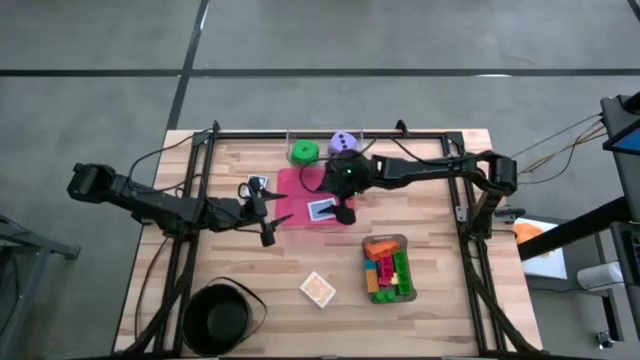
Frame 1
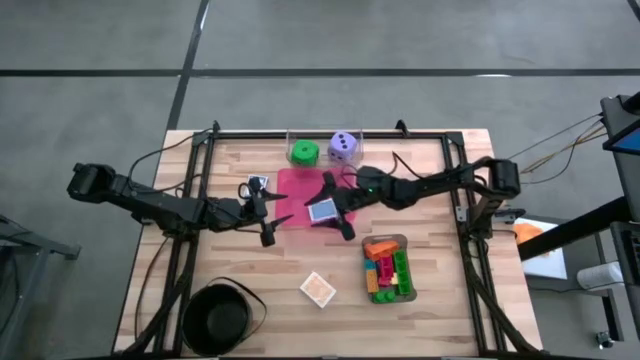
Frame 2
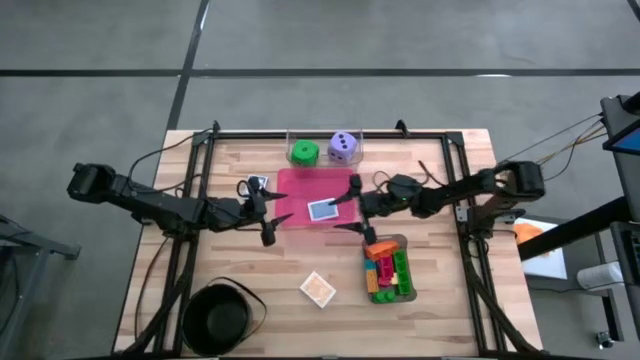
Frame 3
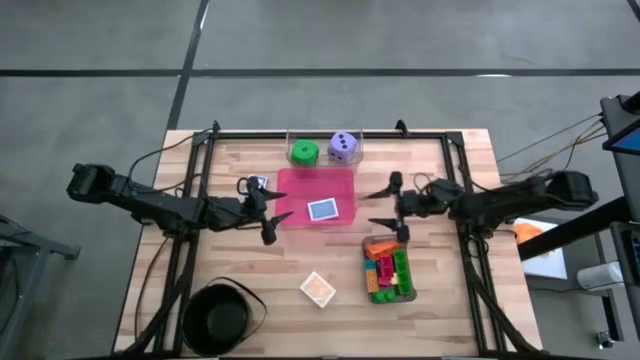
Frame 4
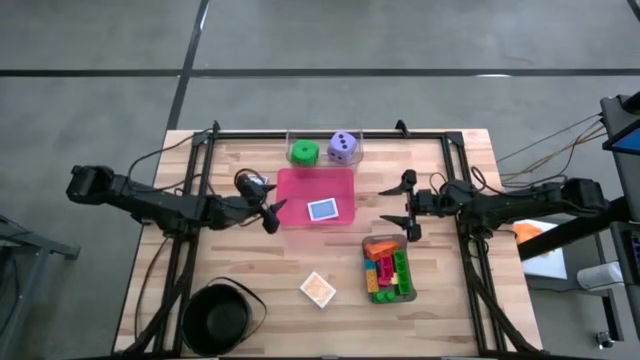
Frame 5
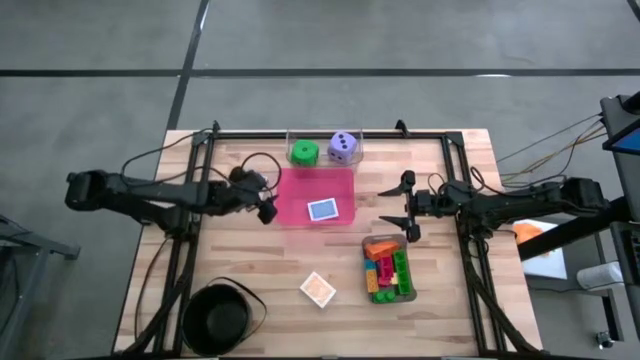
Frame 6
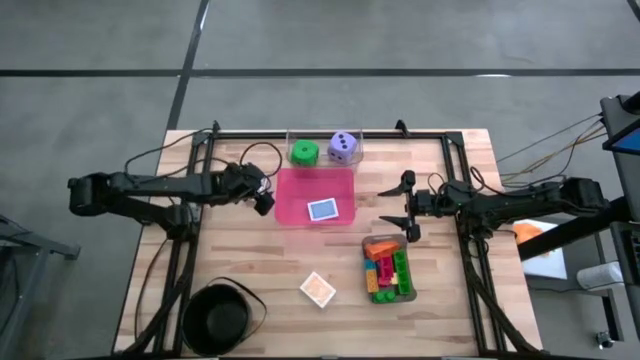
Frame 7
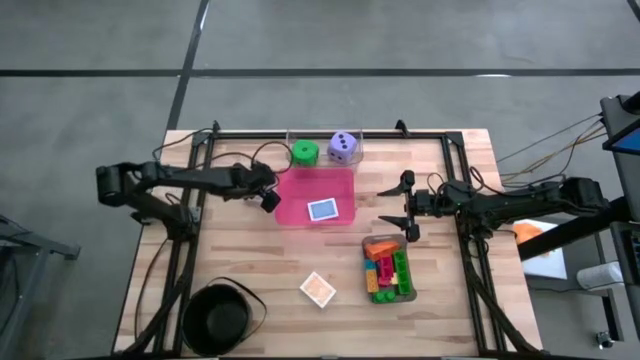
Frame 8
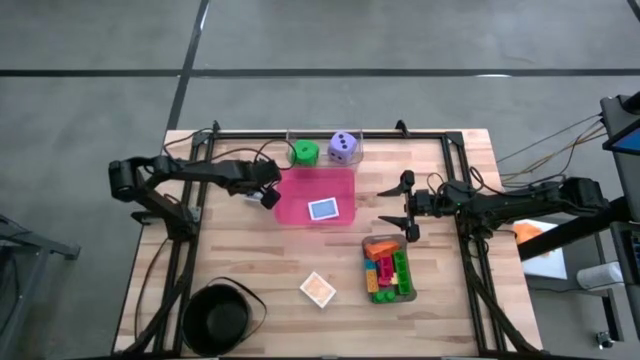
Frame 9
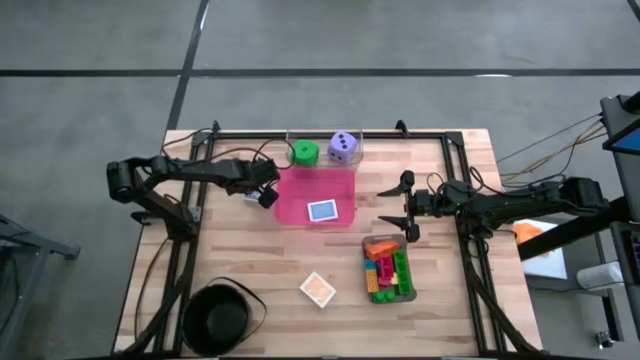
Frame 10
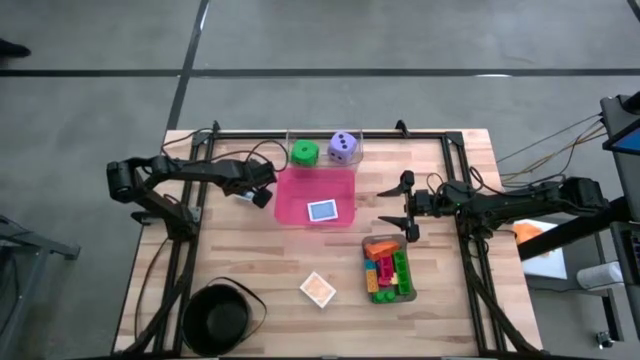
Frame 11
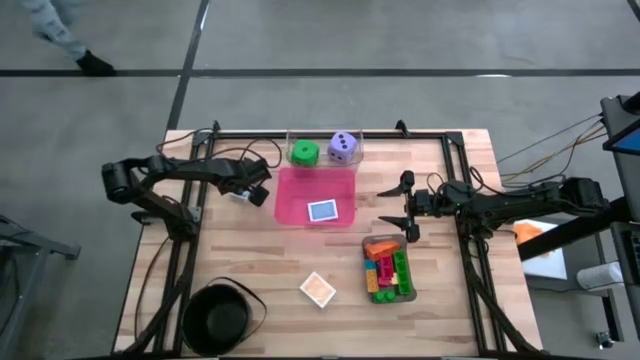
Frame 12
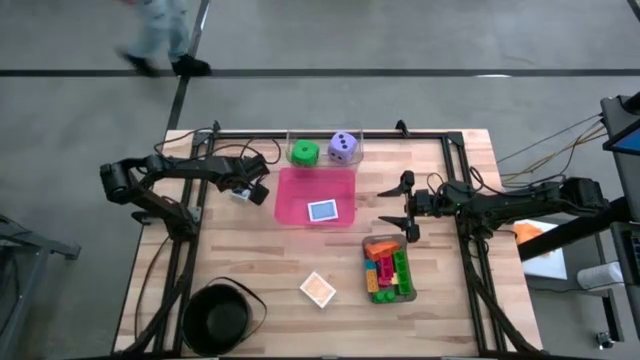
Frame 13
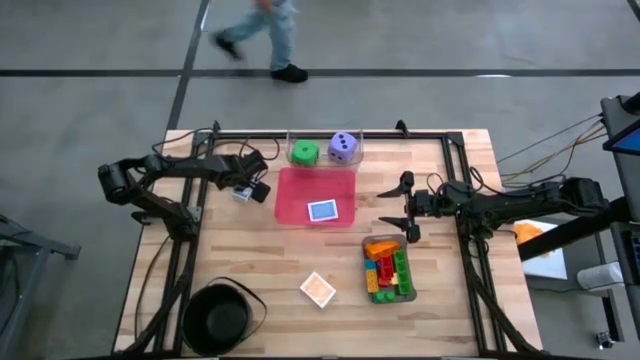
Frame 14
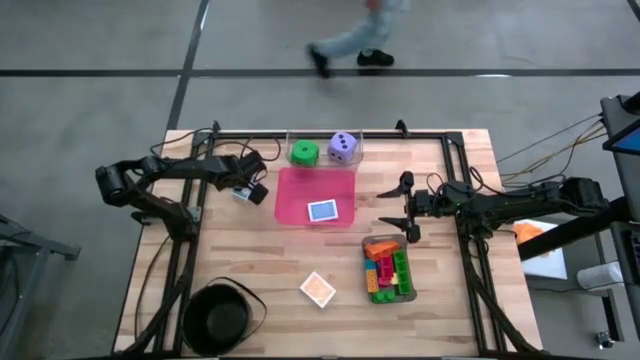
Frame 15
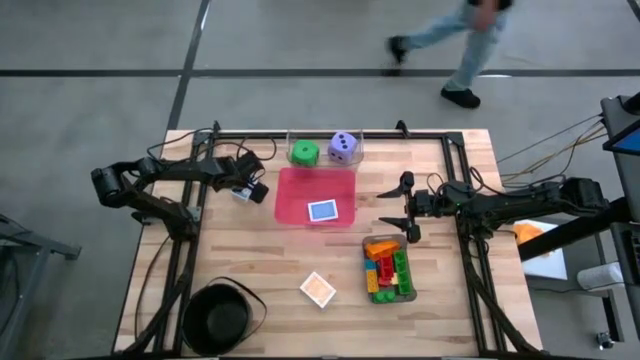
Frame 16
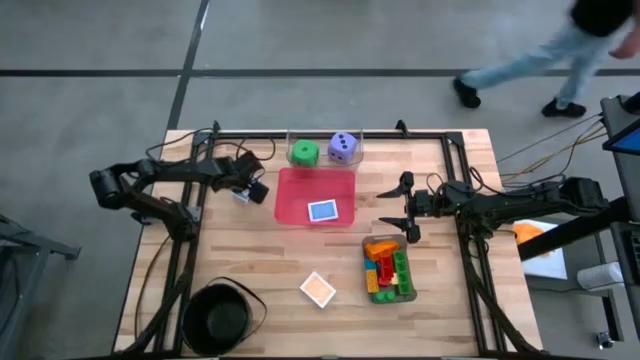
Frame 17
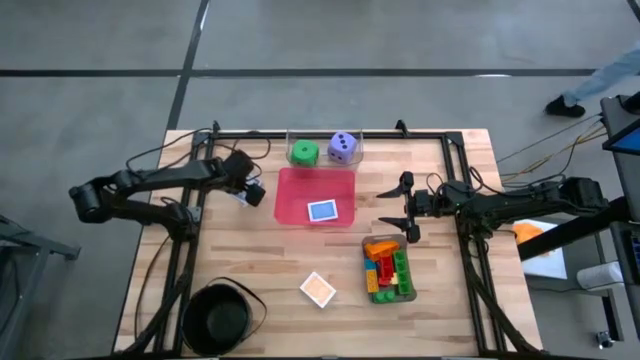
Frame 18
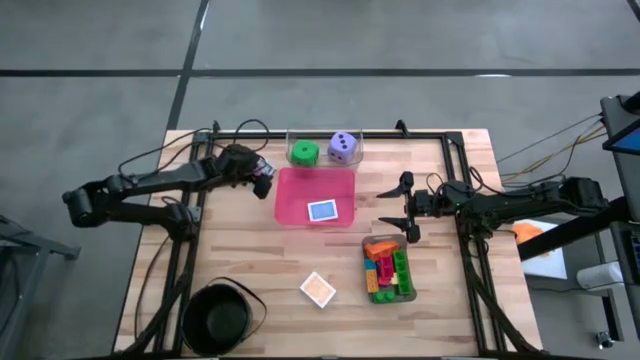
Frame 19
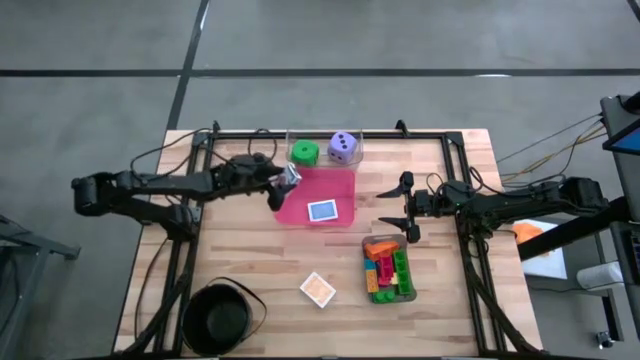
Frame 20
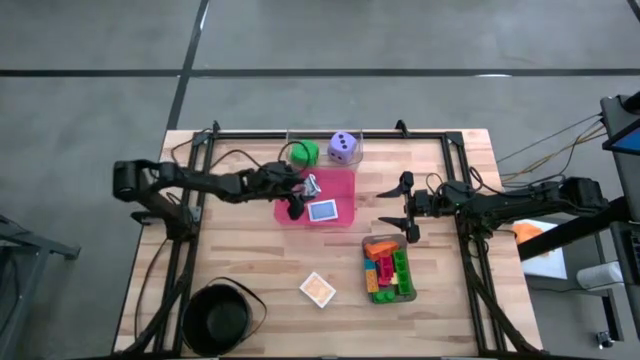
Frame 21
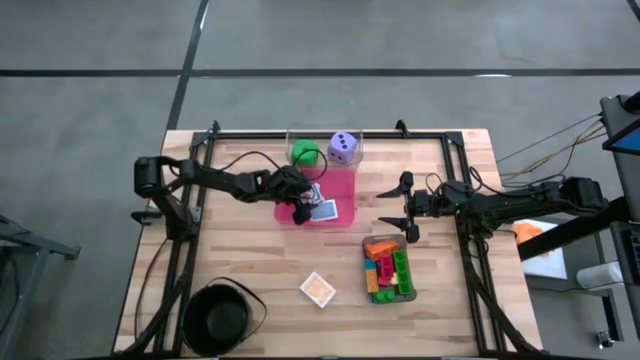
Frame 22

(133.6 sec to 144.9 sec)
Task: Pick & Place Toys
Put the blue game card into the red bin

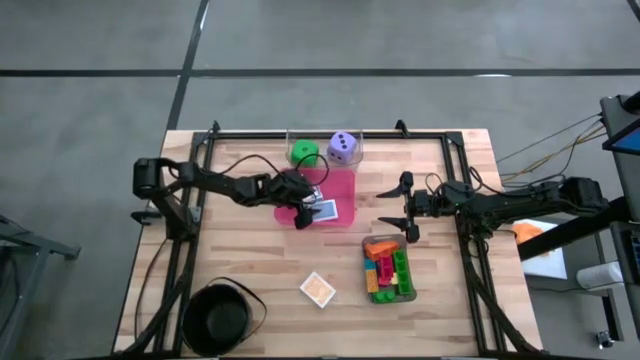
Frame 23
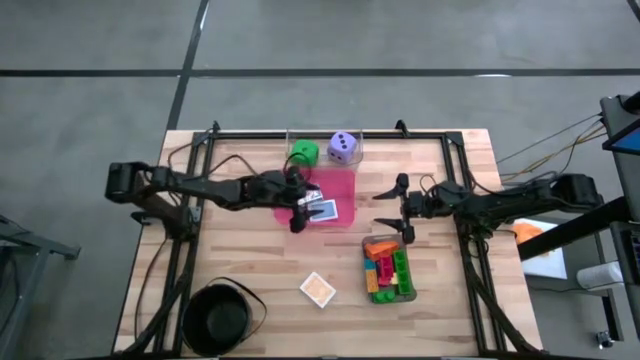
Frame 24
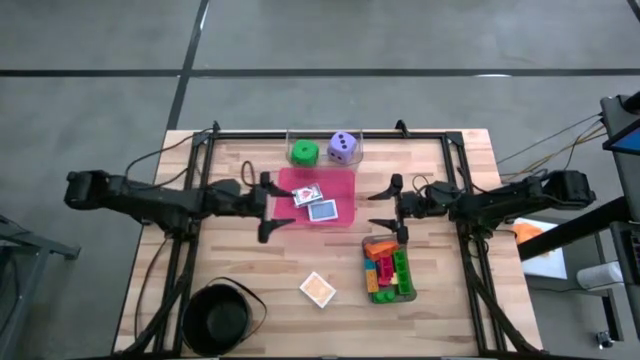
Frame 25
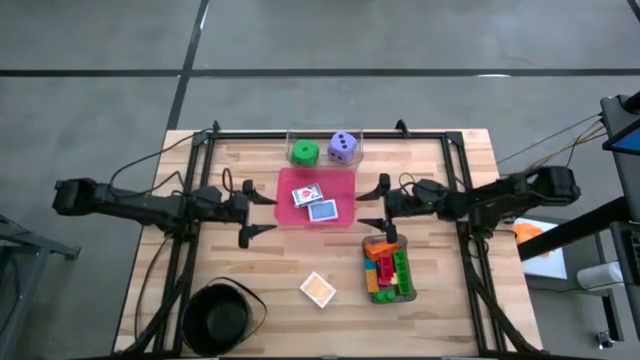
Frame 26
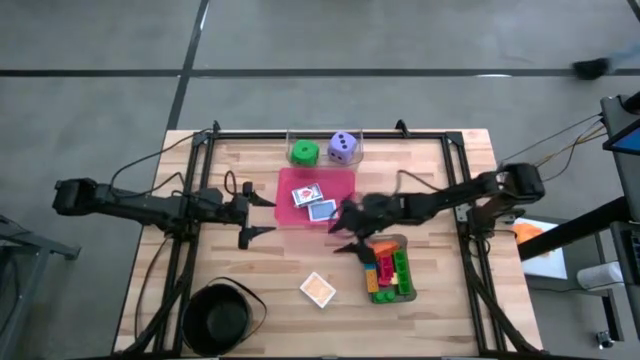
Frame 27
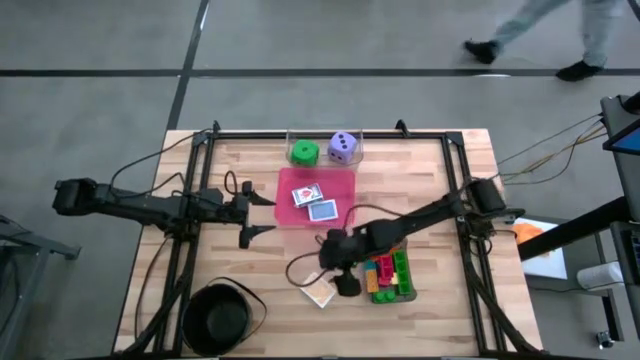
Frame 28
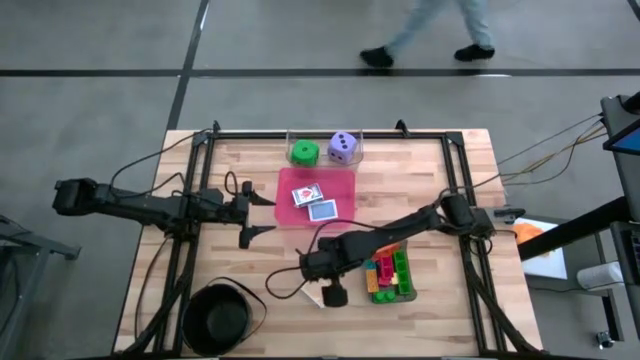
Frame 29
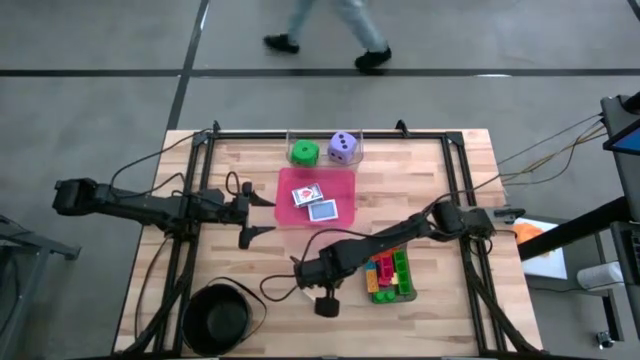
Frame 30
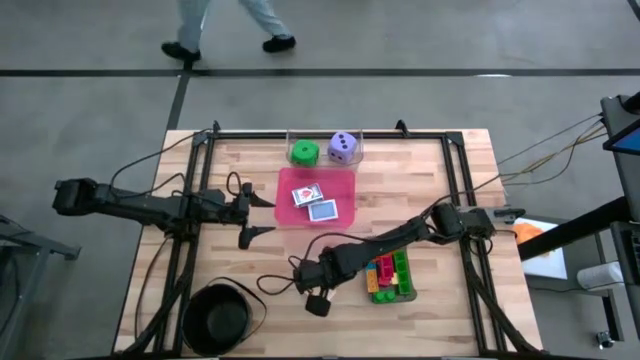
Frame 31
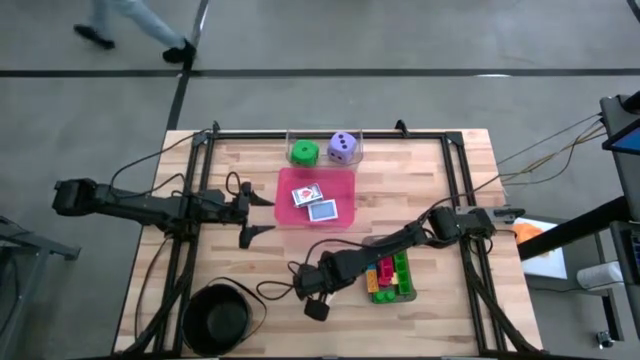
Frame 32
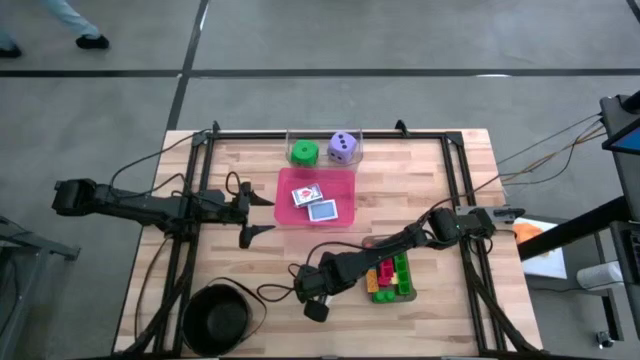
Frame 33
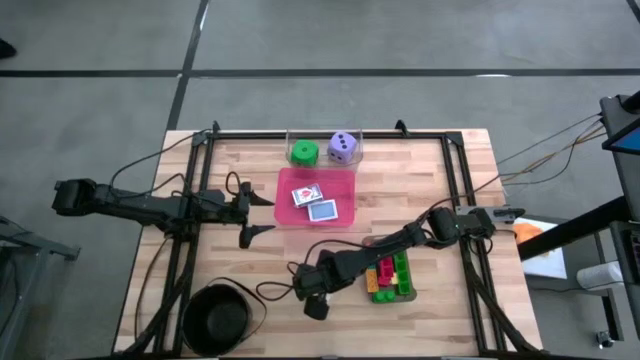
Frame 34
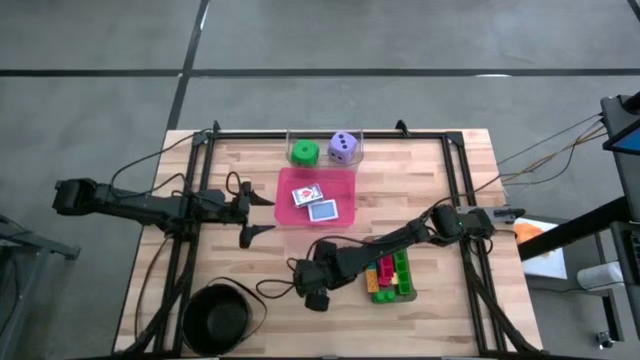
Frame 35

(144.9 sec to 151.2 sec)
Put the yellow game card into the red bin

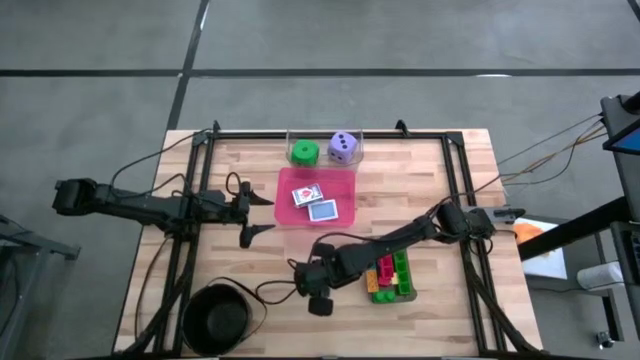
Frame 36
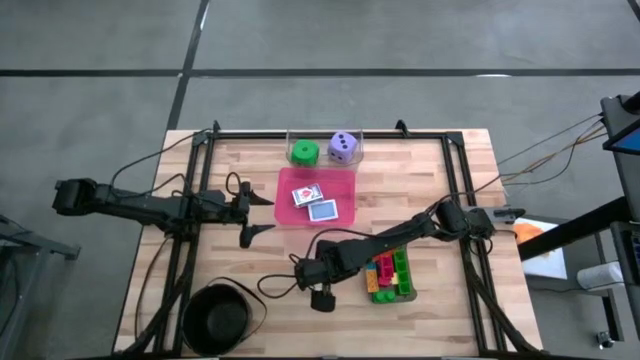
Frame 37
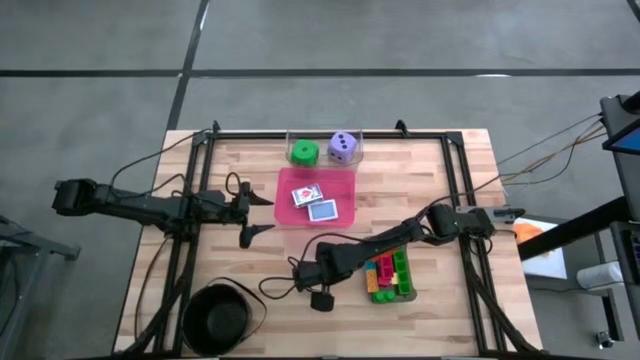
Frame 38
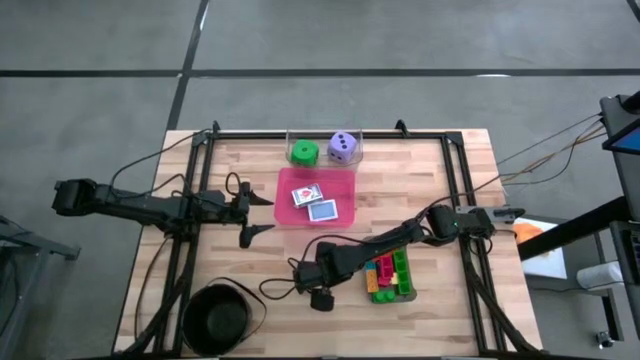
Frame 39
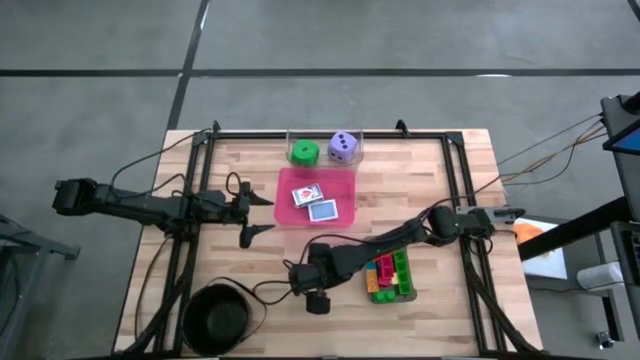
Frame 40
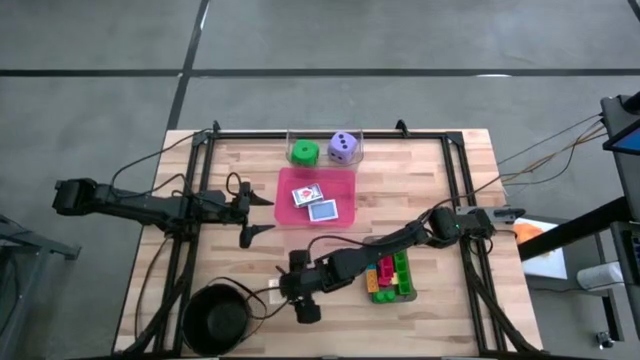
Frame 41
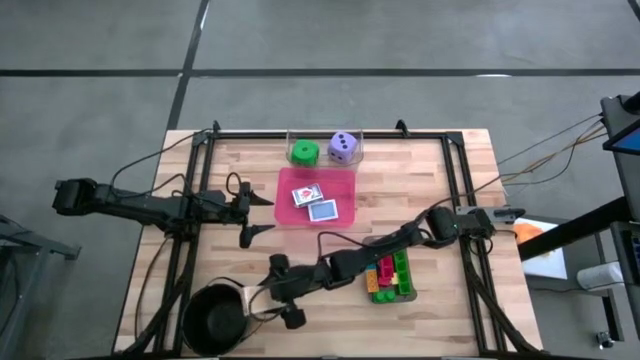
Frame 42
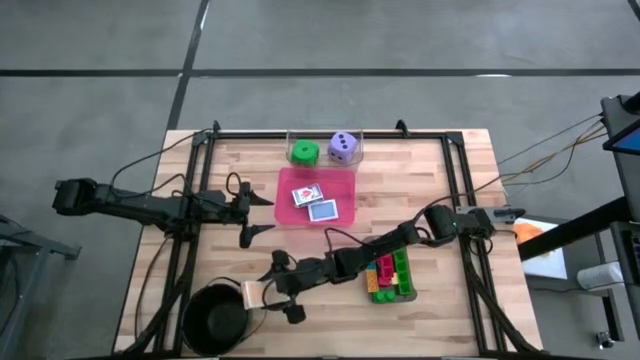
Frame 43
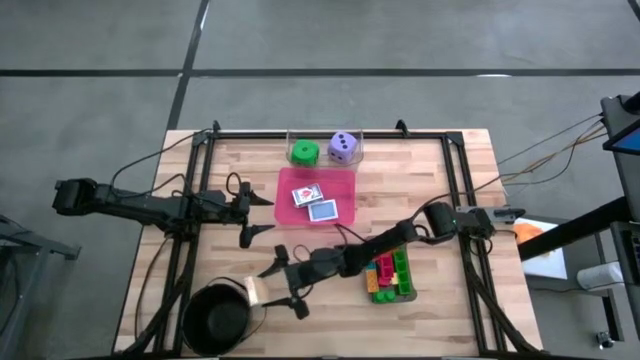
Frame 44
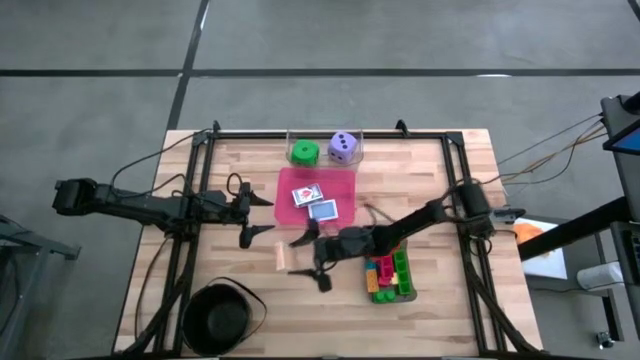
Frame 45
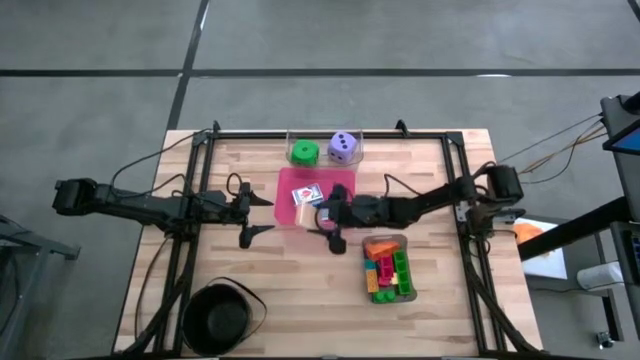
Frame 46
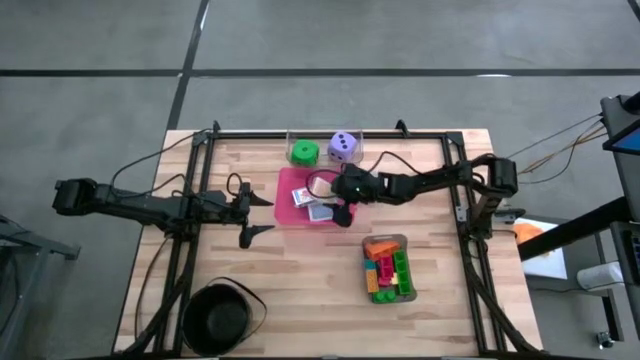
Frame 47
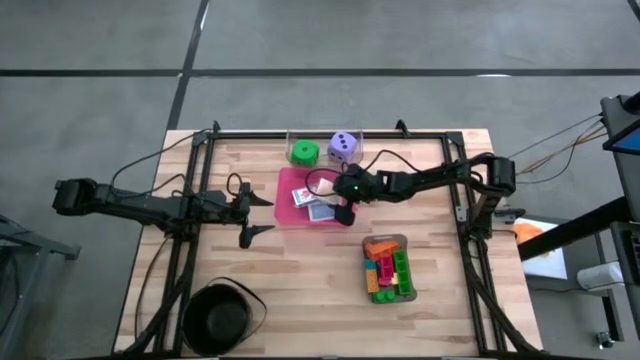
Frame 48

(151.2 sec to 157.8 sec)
Put the yellow game card into the red bin
